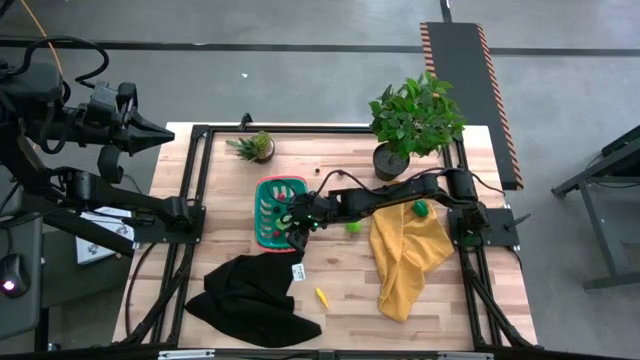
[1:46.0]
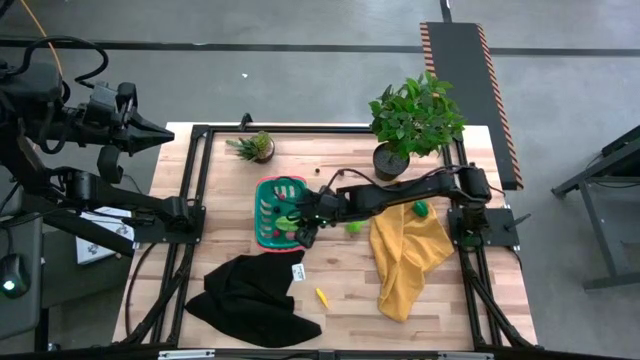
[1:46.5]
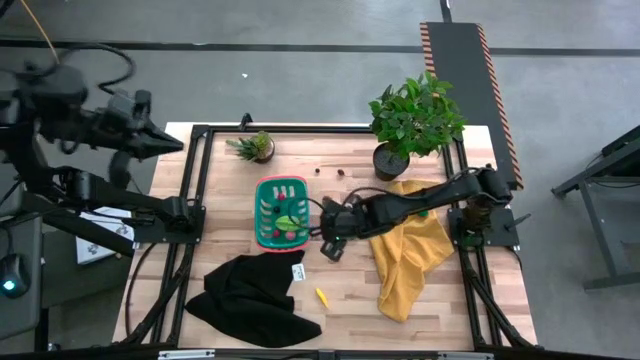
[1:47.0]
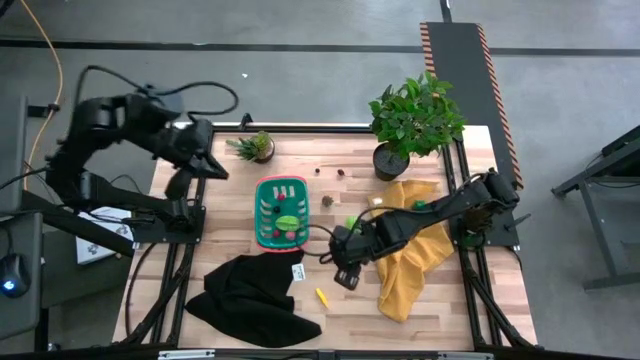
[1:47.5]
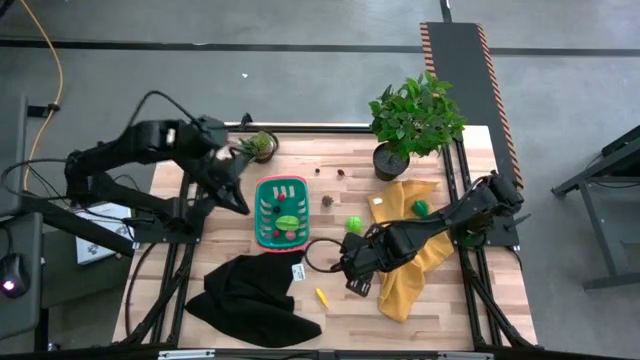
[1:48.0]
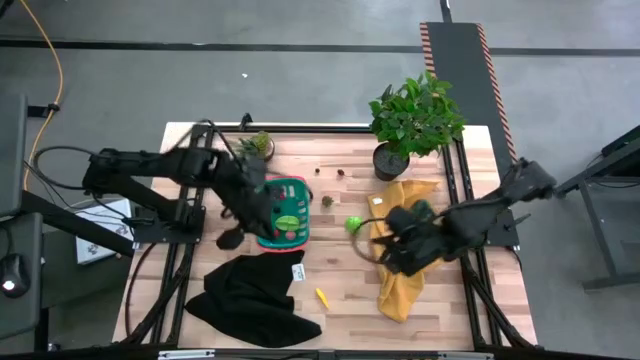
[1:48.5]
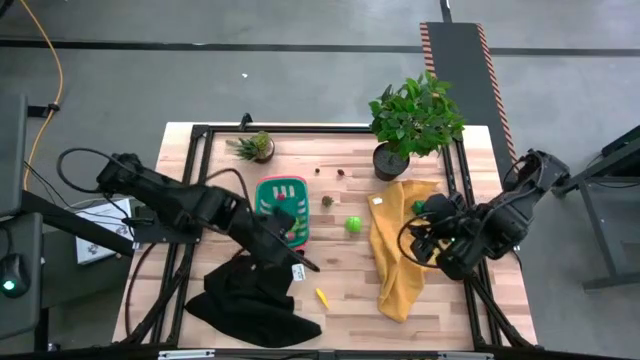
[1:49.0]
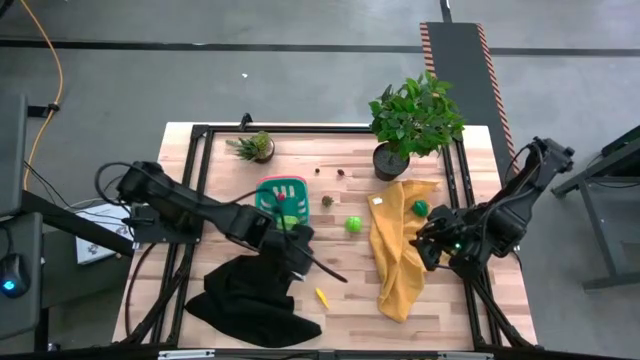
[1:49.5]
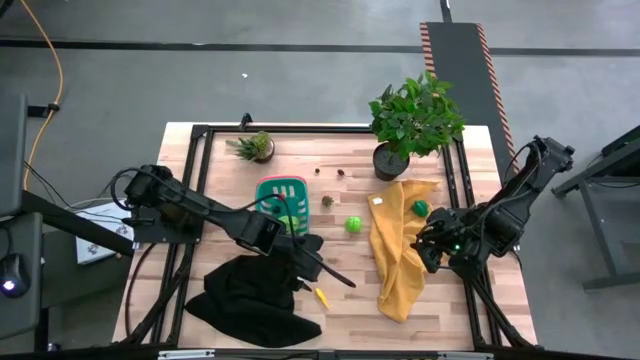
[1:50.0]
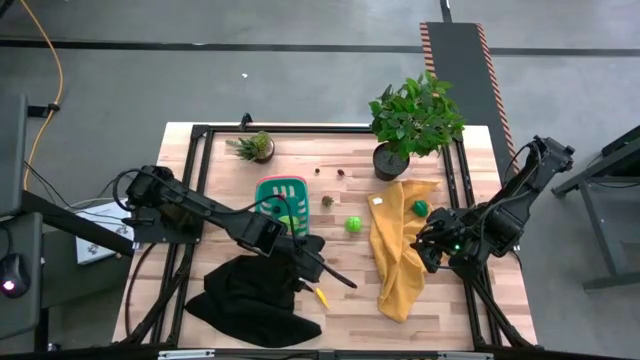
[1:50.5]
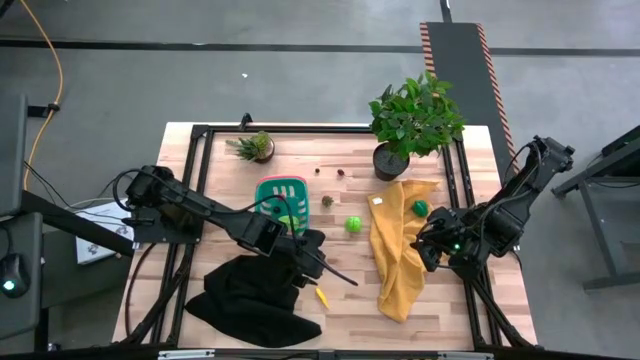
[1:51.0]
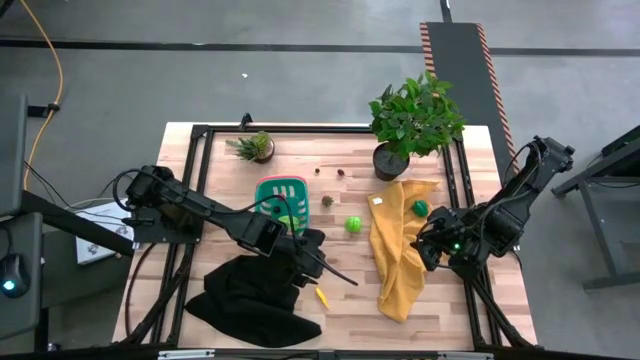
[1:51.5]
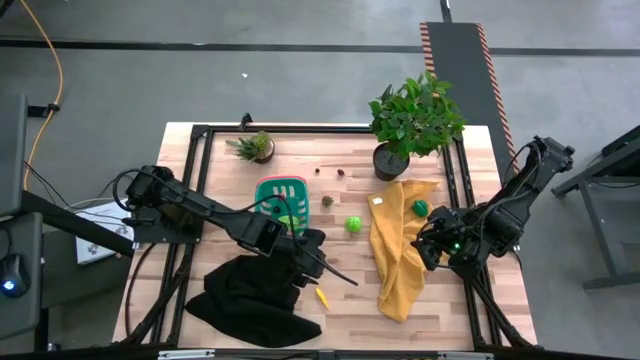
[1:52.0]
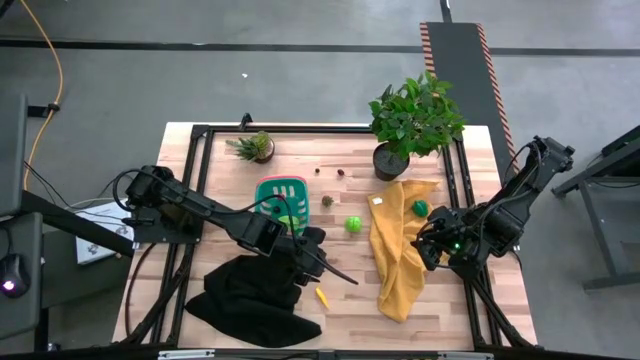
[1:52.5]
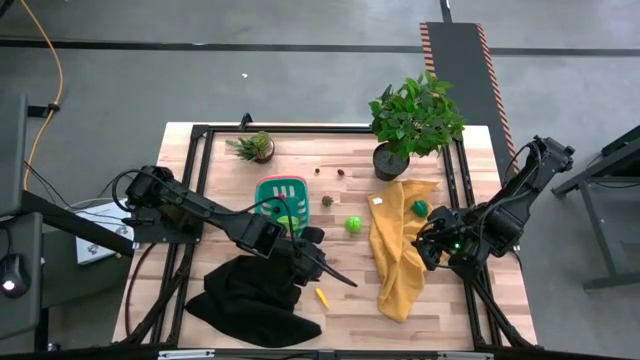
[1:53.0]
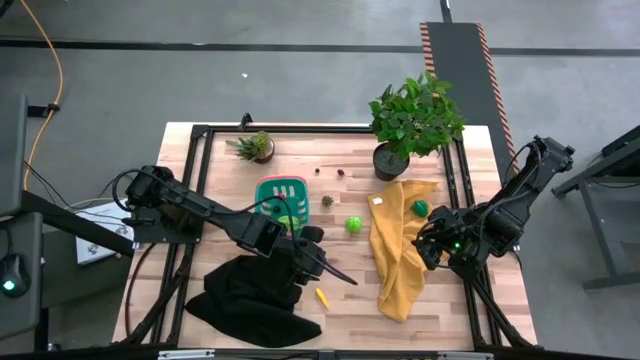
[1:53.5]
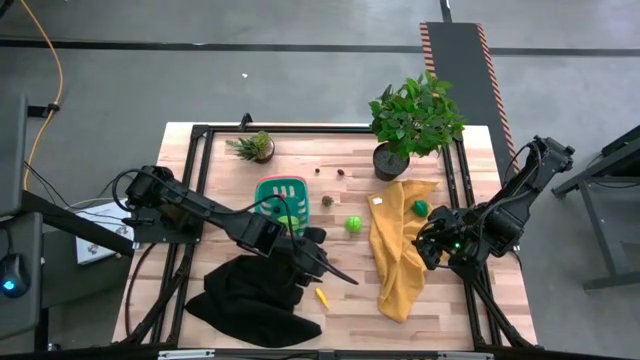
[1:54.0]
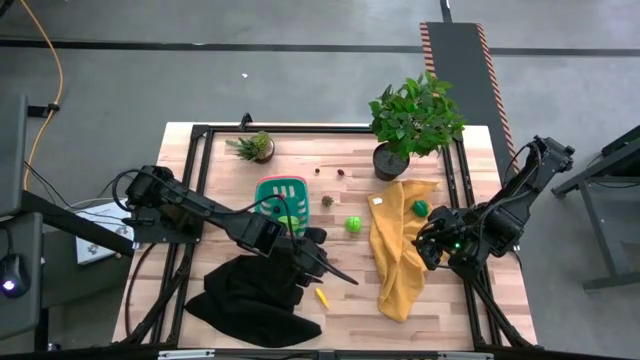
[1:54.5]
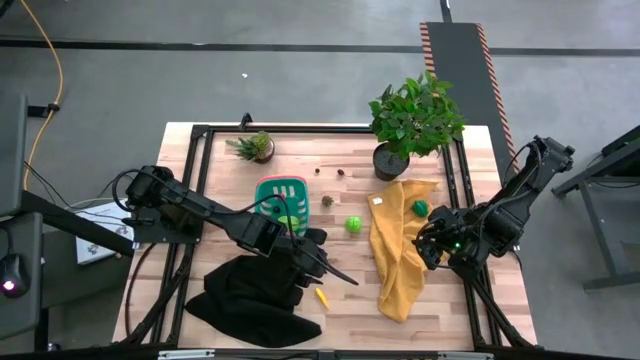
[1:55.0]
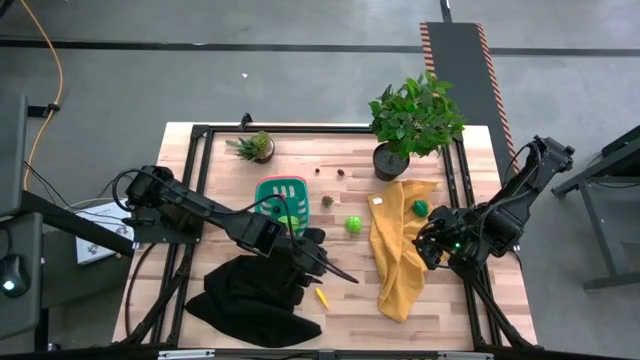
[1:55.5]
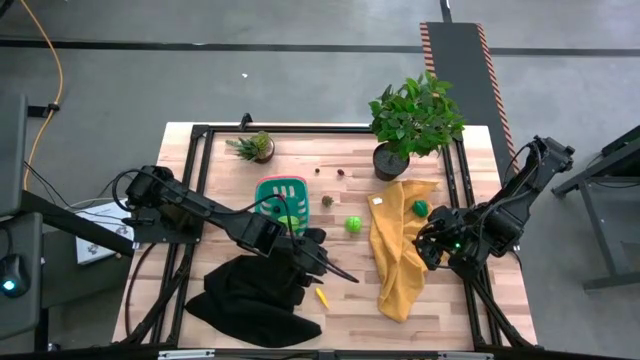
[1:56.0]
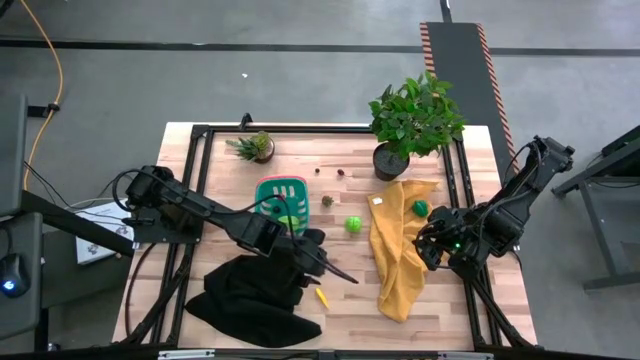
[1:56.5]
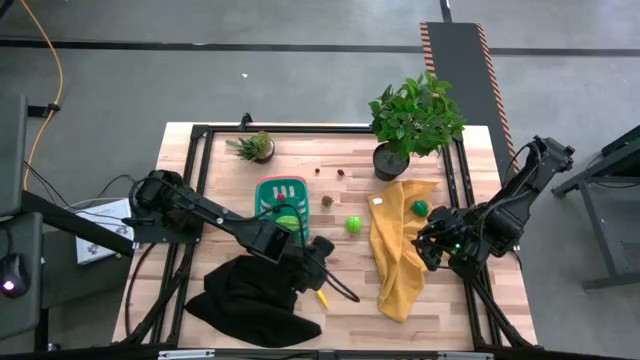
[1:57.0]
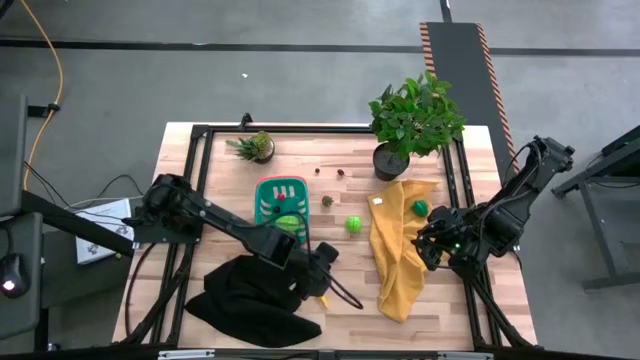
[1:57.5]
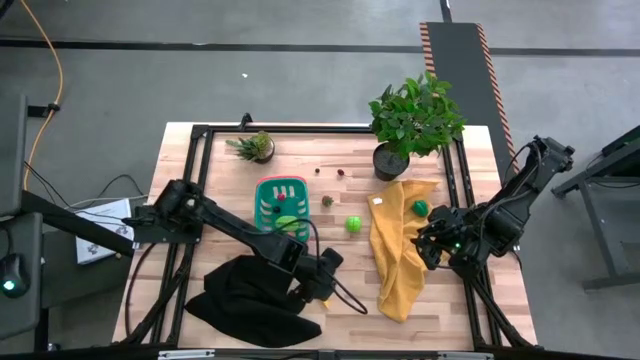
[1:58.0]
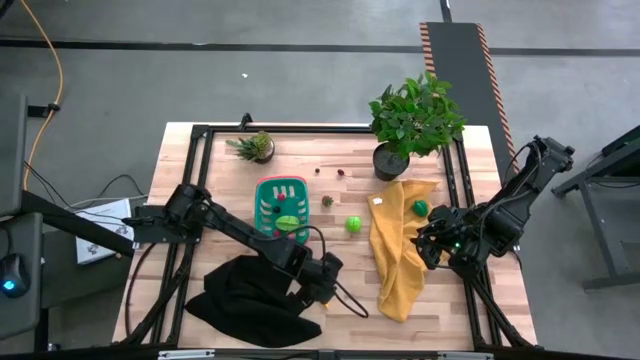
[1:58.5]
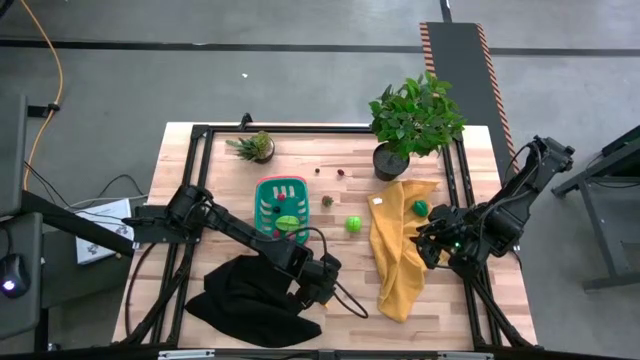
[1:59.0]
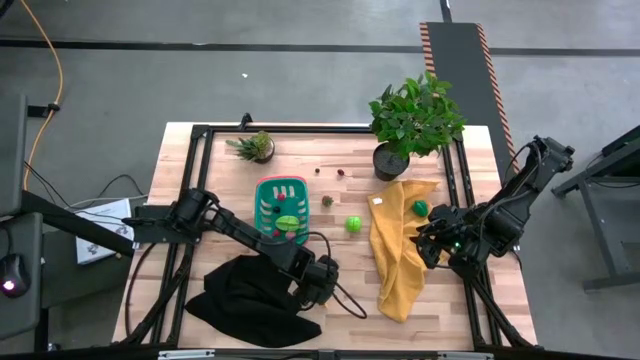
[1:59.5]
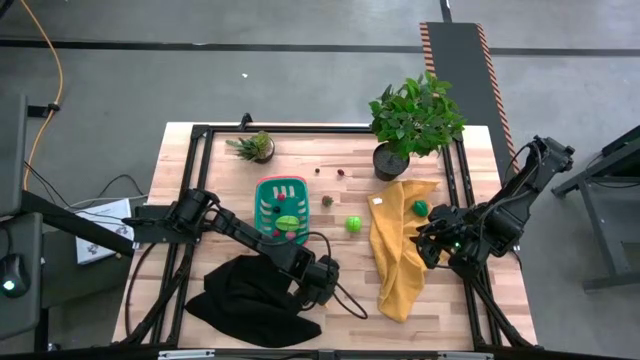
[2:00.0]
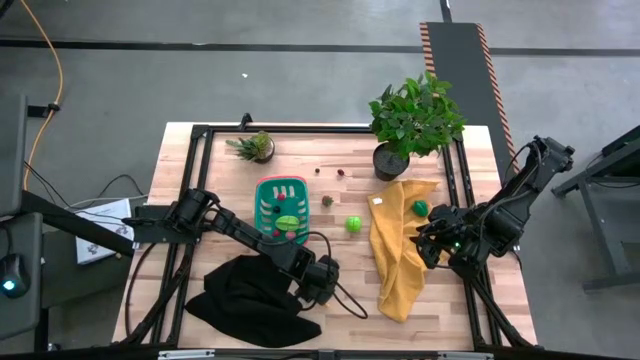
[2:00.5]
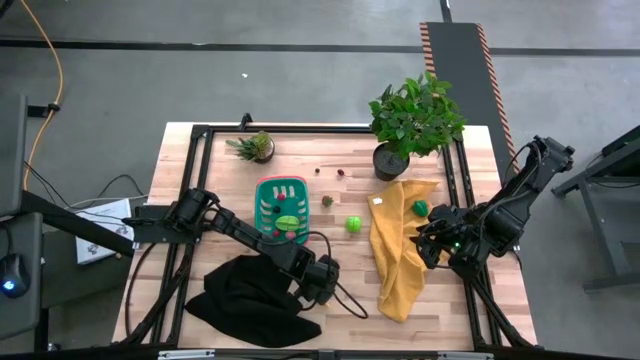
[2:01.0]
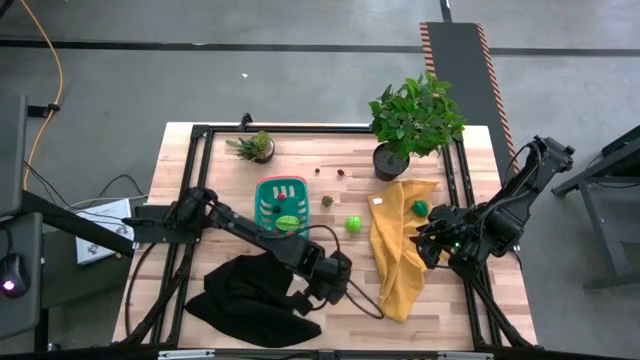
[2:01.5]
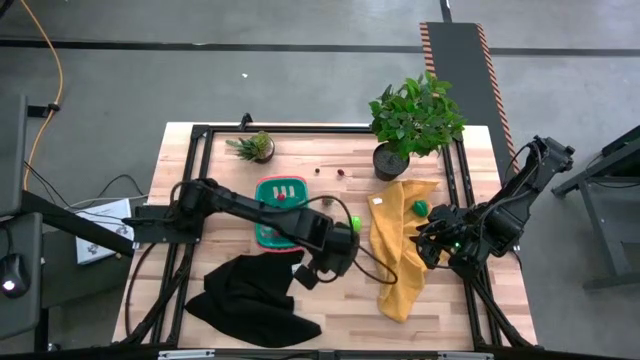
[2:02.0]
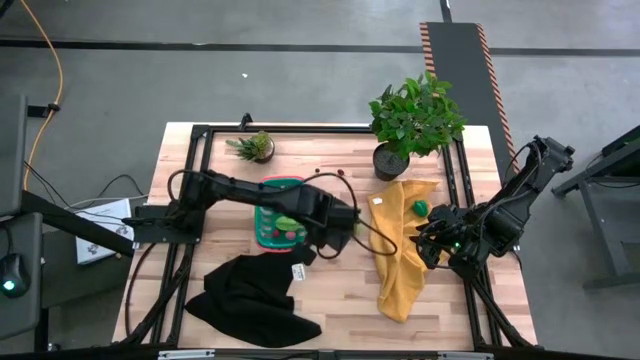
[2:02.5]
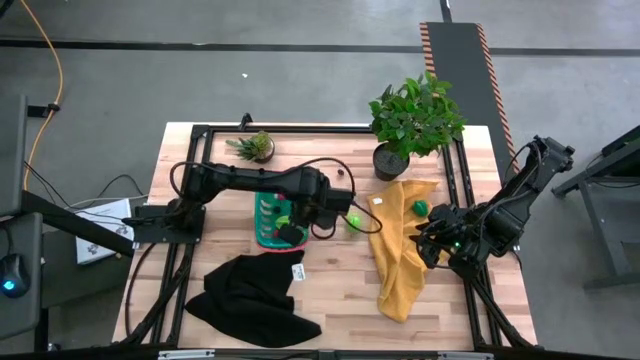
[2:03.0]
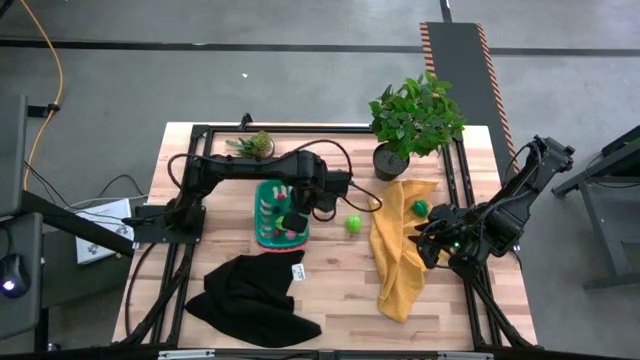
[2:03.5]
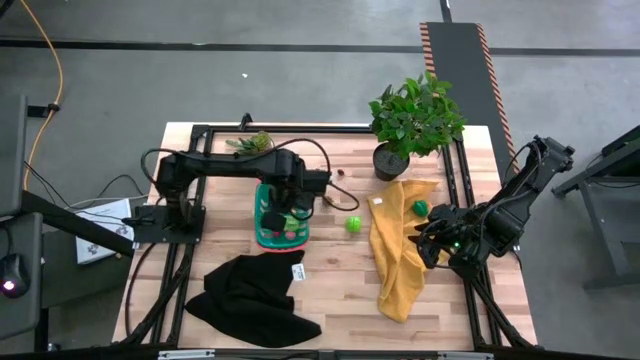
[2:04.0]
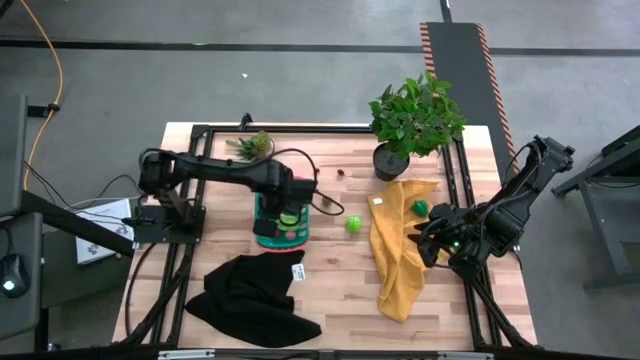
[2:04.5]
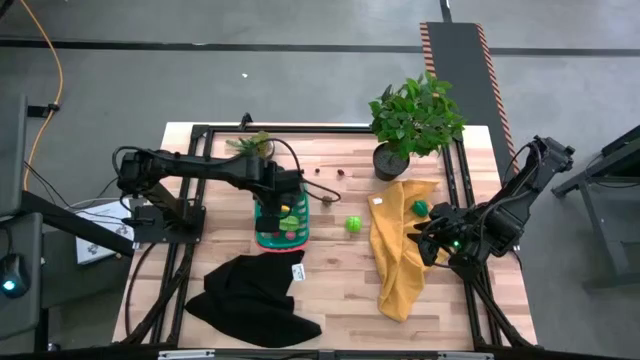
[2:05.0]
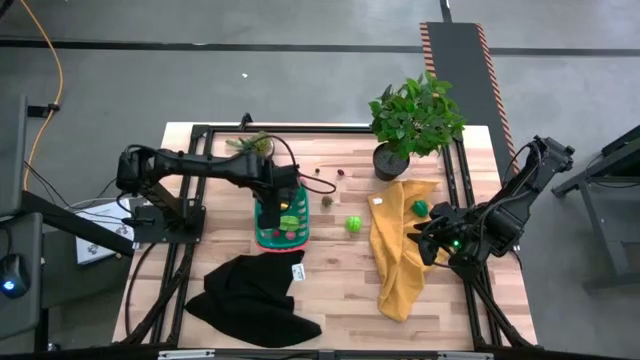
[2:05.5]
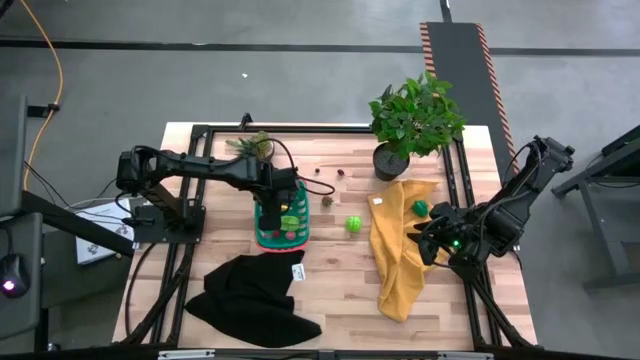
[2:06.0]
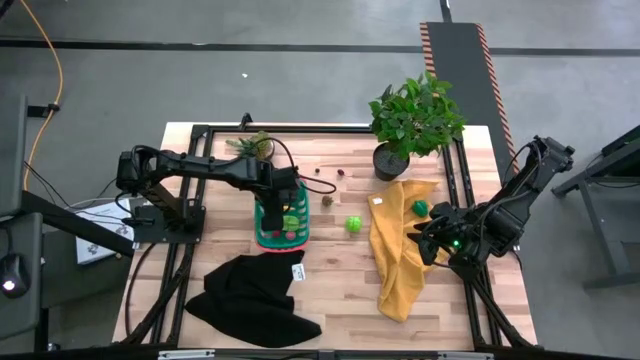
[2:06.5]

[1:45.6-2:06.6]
Task: Pick and placing Produce into tupperware
Put the yellow corn in the green basket
